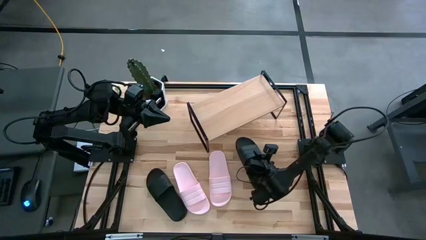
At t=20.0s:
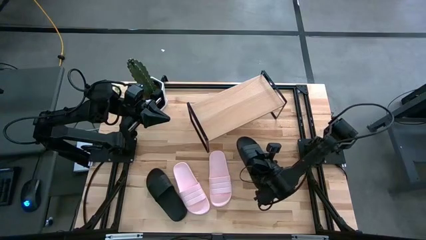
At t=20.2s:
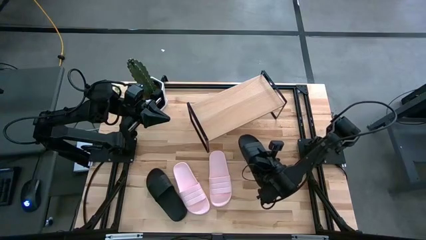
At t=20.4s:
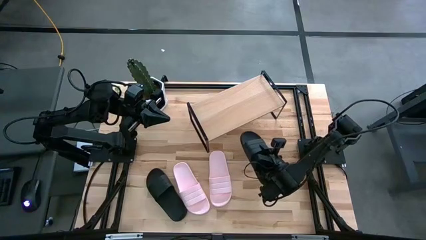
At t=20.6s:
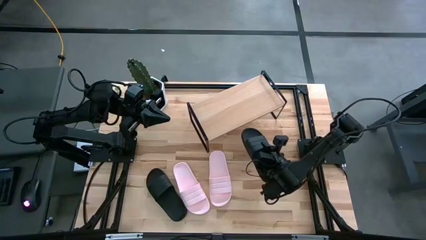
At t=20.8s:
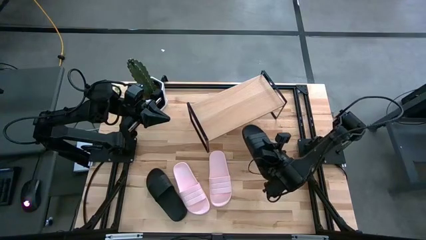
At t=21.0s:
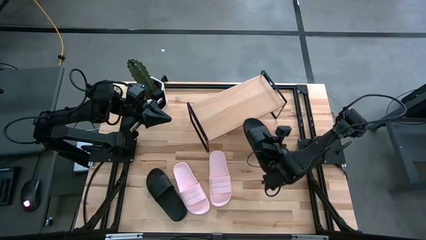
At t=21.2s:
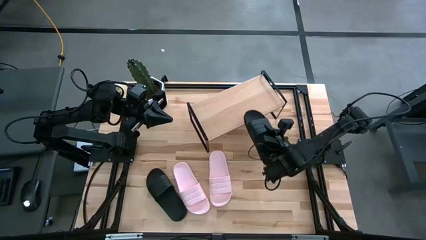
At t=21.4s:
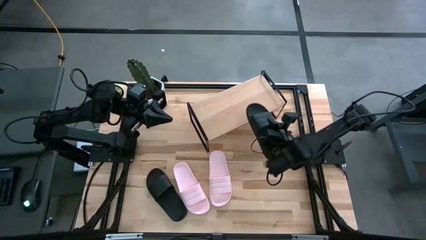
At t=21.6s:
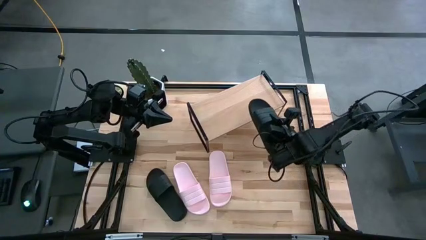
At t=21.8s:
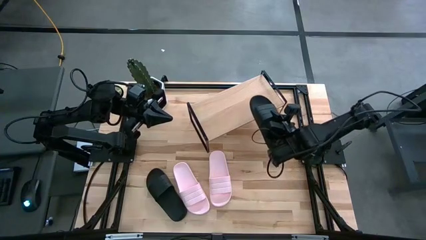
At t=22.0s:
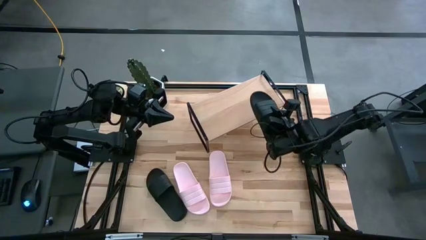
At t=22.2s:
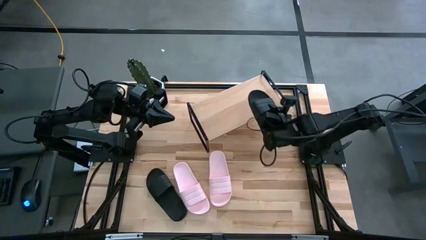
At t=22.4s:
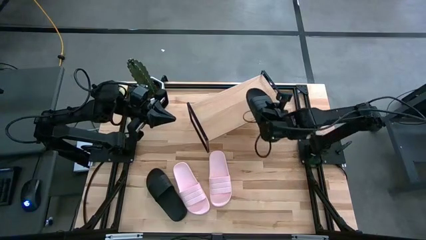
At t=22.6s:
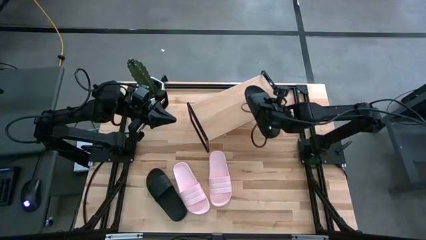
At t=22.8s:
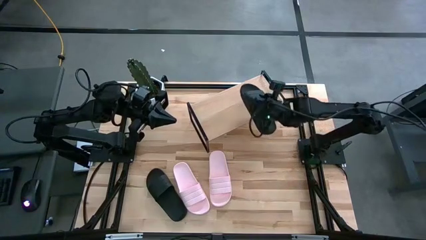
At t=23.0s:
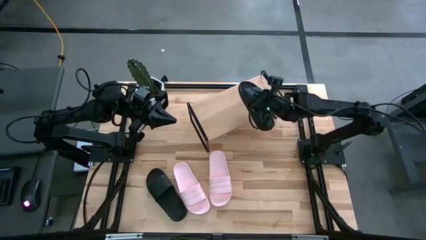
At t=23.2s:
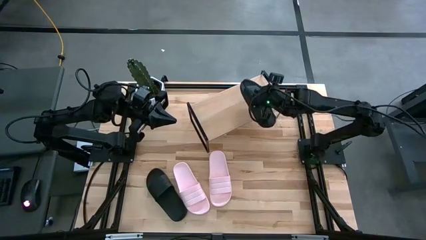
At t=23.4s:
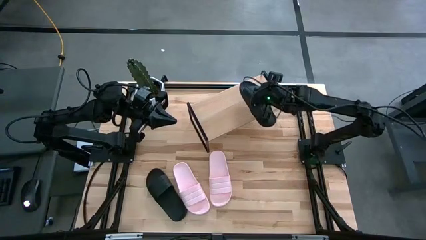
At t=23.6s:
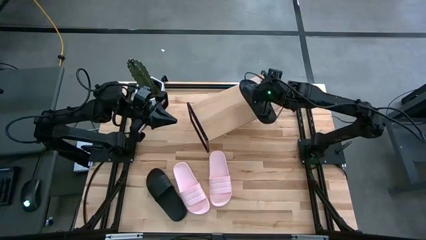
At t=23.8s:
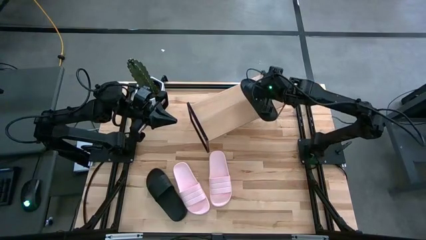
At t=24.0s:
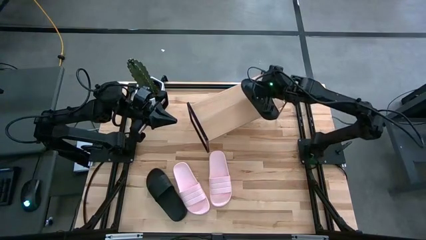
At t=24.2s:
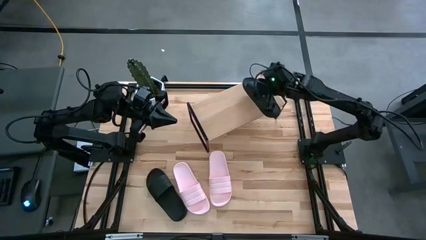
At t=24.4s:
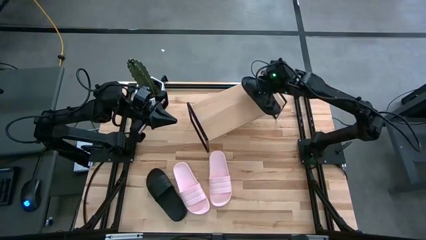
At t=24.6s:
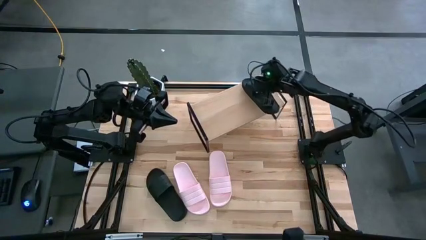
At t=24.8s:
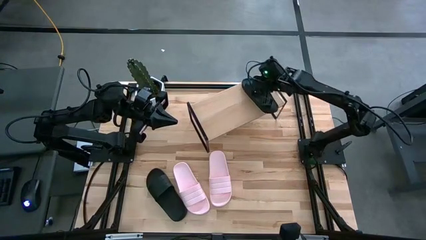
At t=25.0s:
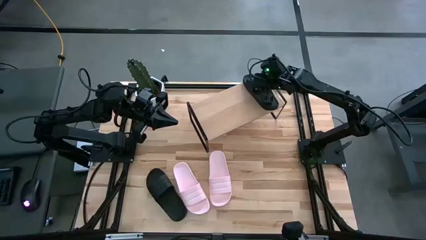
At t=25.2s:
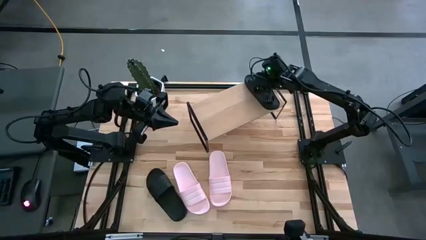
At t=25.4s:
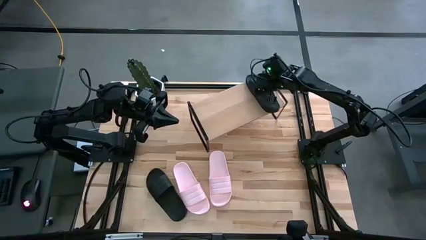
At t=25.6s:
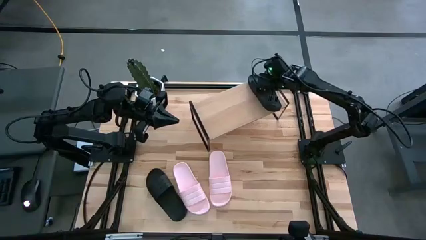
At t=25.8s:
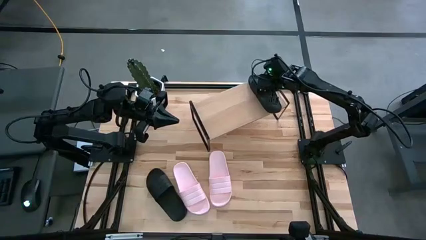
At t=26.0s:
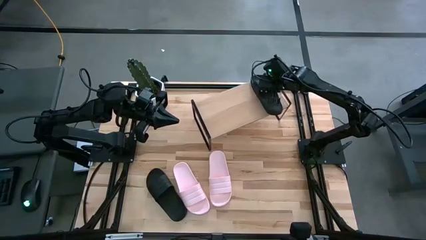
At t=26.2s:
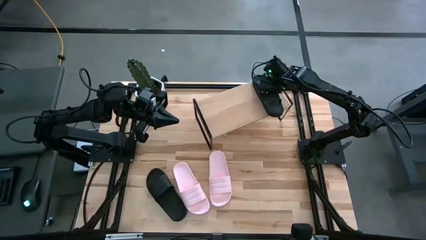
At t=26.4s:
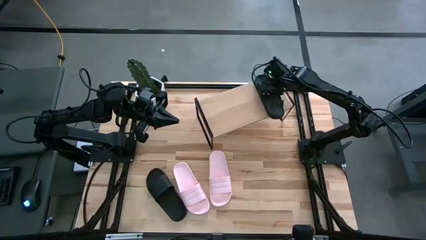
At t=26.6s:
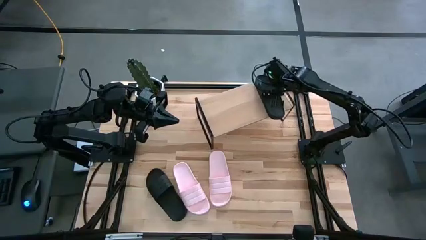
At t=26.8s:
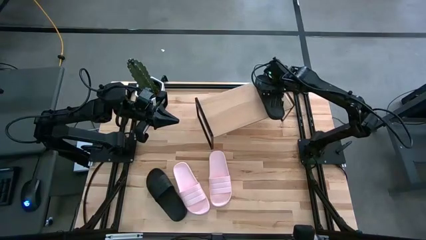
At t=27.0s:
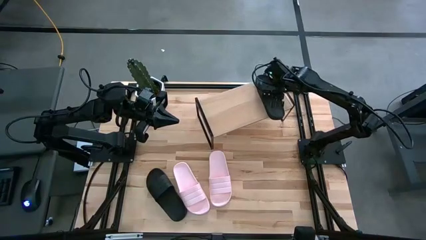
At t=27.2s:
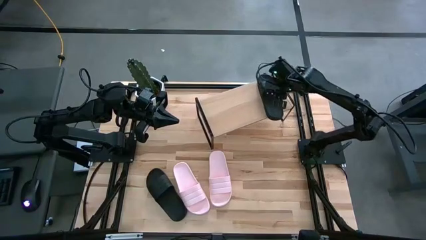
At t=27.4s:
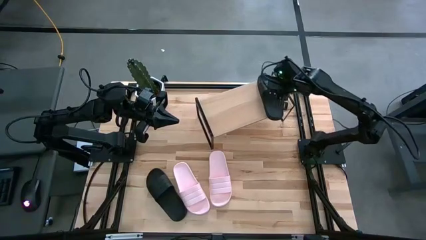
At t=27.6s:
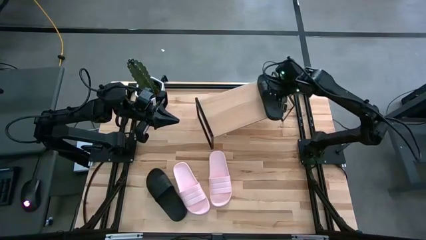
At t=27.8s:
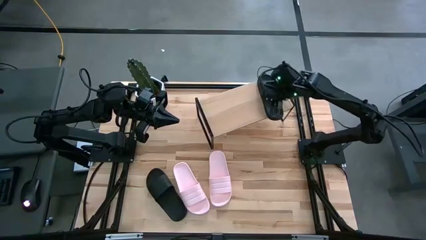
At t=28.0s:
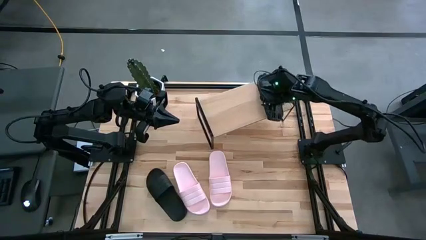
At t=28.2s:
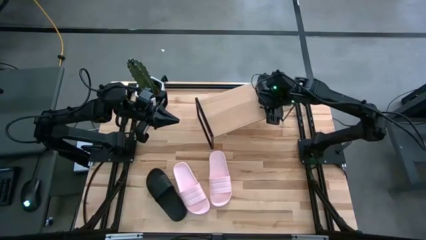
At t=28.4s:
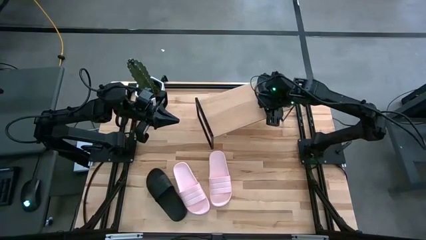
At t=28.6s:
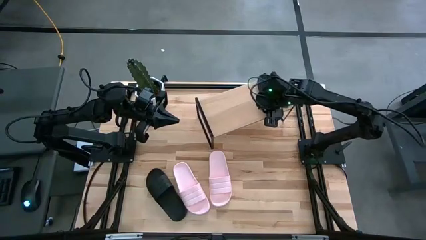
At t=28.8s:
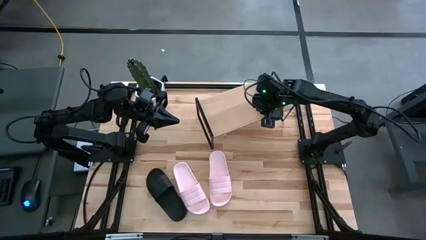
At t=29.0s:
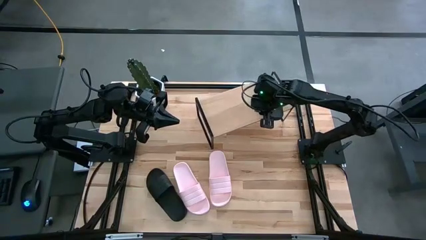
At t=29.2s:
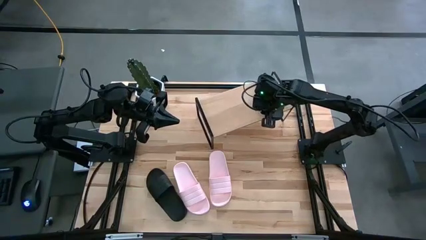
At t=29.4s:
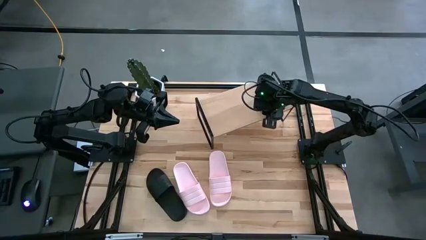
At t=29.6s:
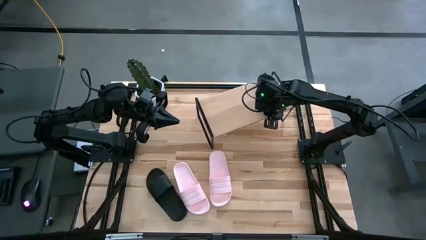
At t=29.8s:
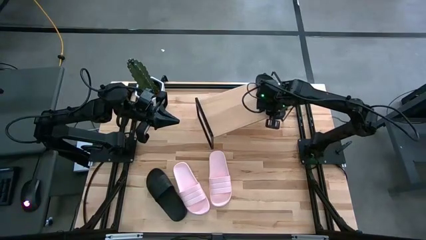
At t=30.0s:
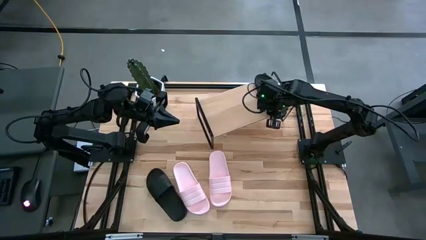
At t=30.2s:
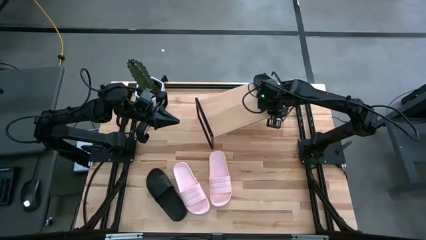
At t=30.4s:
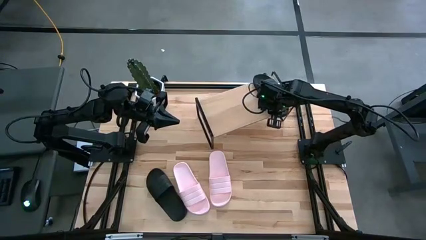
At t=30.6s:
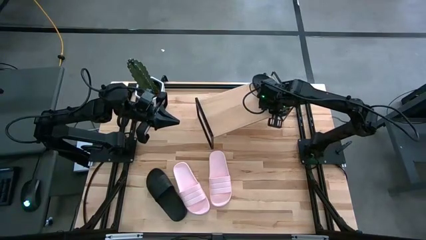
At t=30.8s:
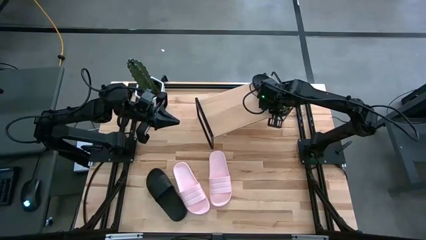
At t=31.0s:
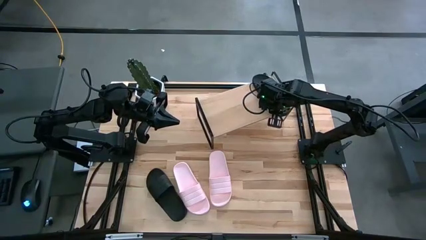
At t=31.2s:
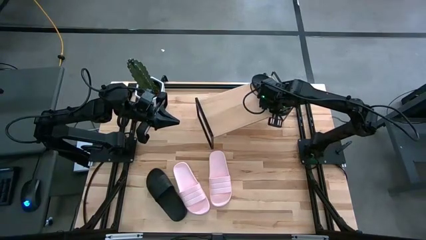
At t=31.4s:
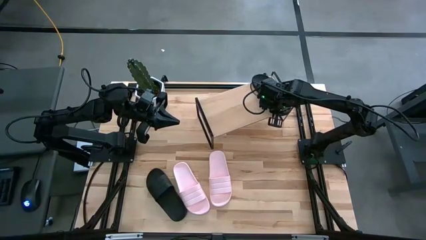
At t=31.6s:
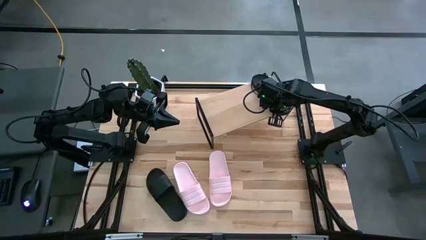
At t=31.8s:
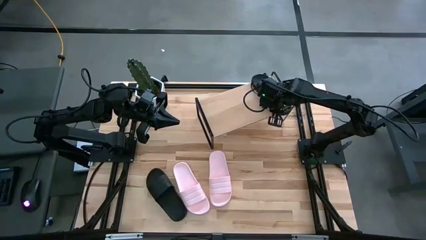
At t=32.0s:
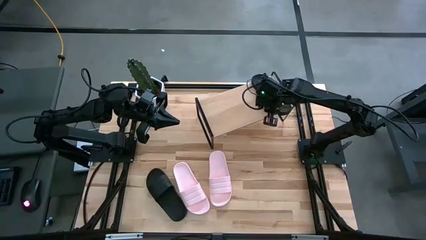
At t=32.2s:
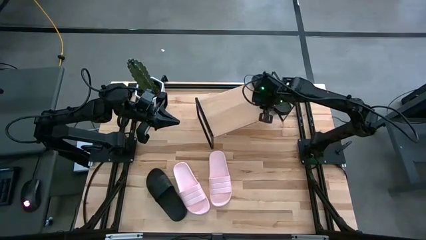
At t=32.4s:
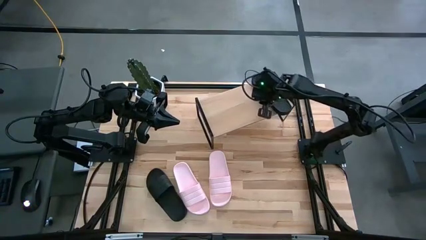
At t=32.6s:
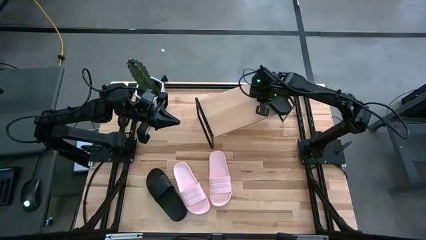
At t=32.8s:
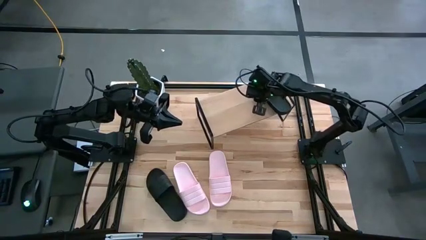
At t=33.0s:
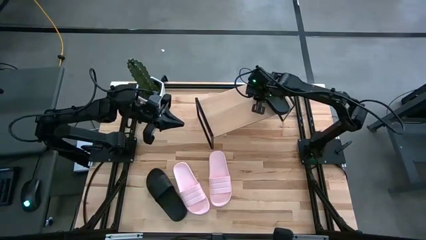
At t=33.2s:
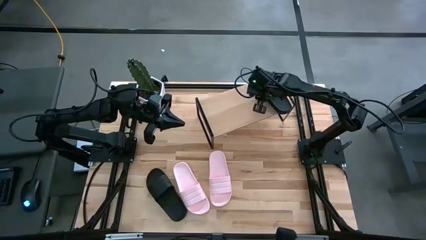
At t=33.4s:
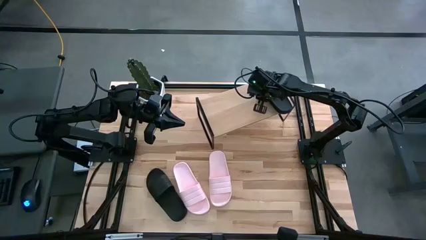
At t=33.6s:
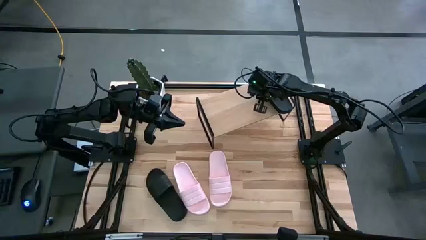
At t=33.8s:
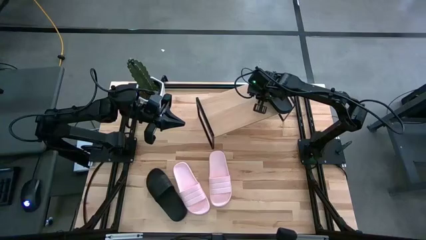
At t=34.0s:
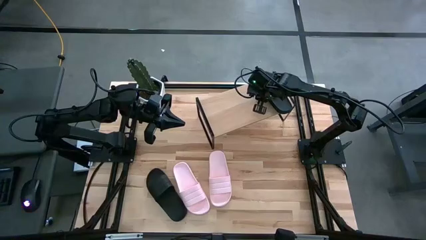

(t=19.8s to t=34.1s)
Task: Pick and place slides into the shelf
Put the right black slide on the shelf
